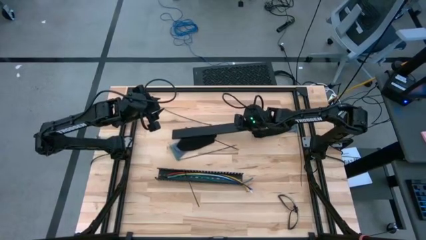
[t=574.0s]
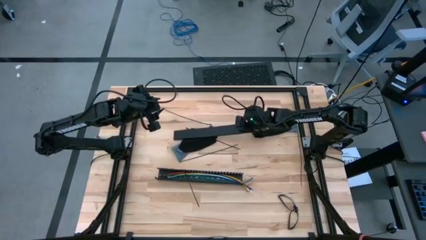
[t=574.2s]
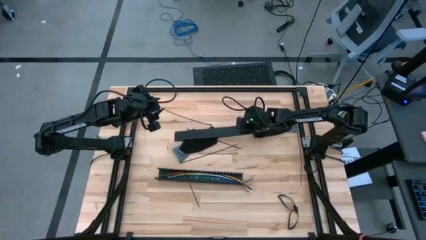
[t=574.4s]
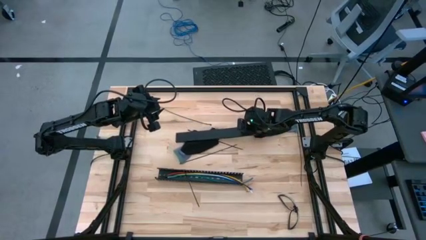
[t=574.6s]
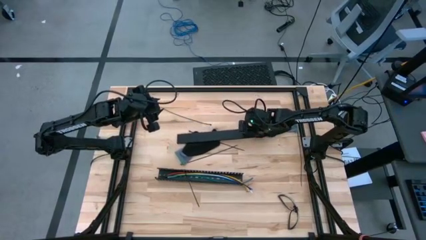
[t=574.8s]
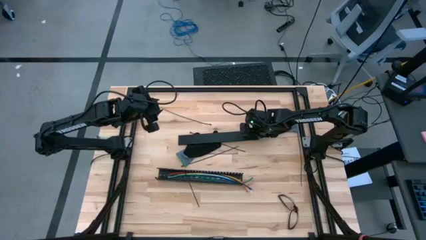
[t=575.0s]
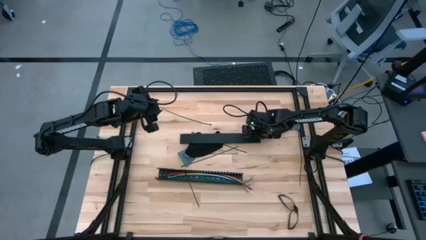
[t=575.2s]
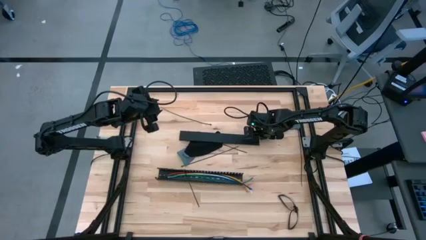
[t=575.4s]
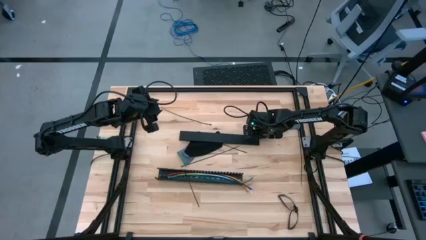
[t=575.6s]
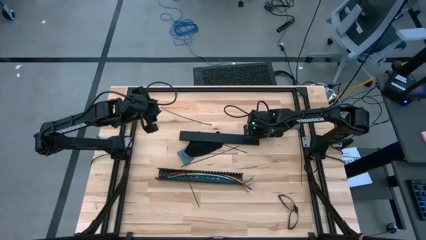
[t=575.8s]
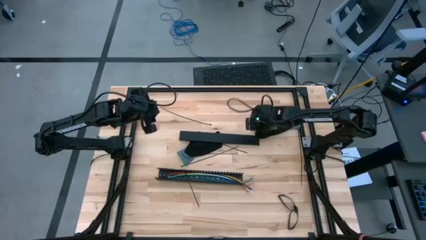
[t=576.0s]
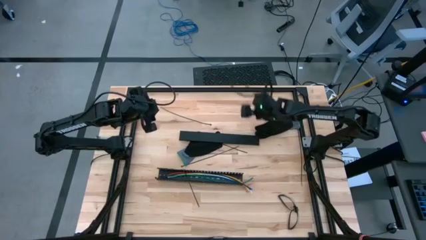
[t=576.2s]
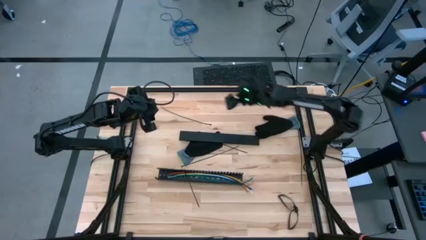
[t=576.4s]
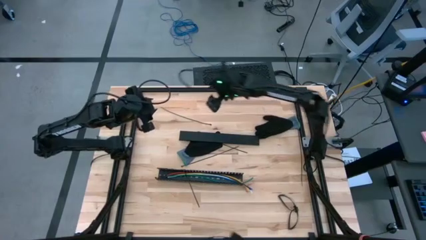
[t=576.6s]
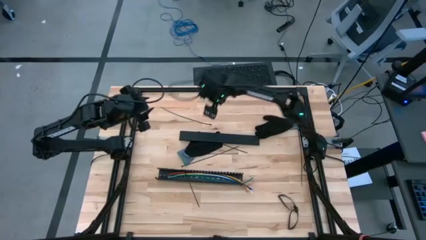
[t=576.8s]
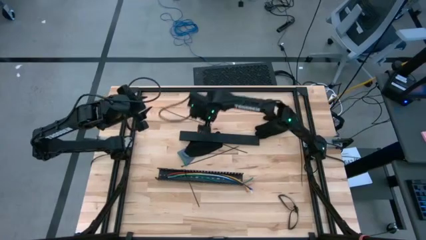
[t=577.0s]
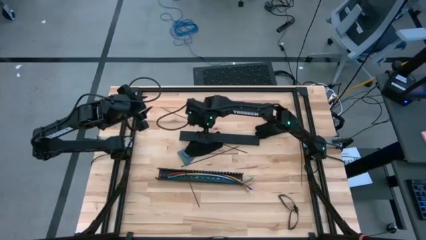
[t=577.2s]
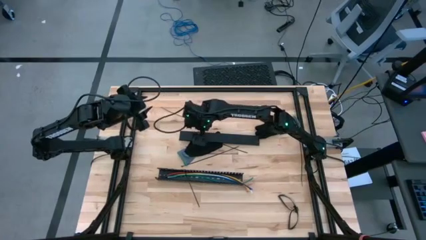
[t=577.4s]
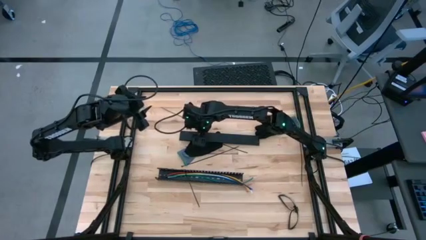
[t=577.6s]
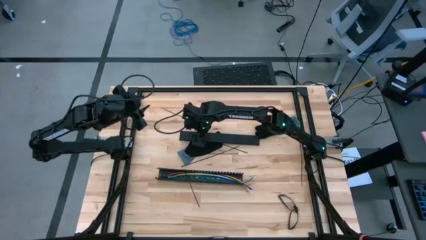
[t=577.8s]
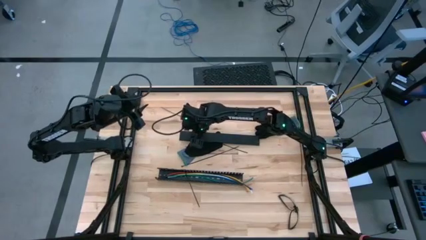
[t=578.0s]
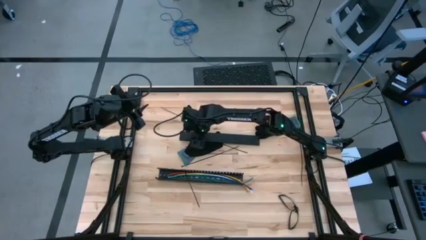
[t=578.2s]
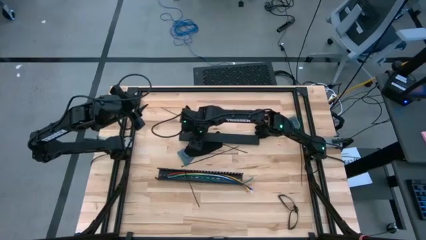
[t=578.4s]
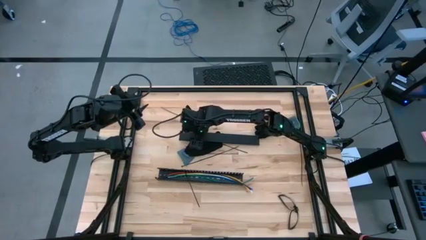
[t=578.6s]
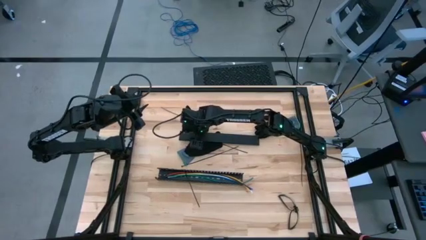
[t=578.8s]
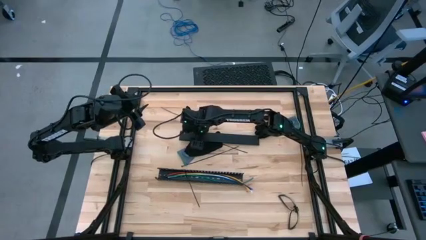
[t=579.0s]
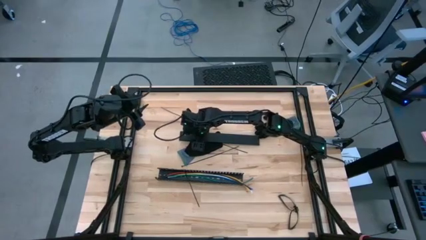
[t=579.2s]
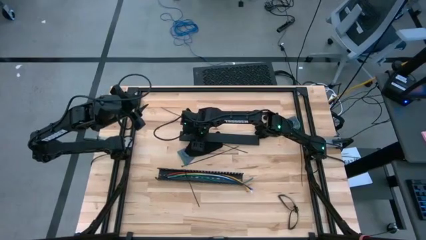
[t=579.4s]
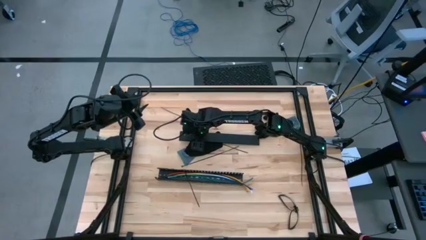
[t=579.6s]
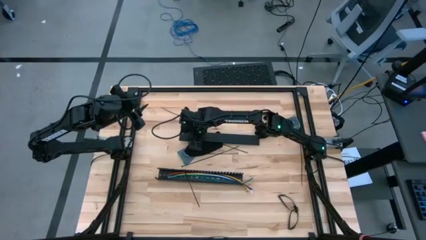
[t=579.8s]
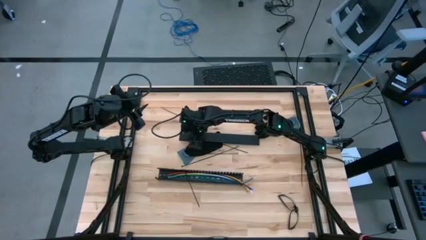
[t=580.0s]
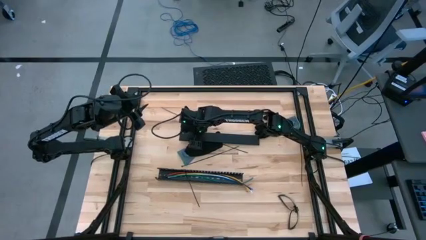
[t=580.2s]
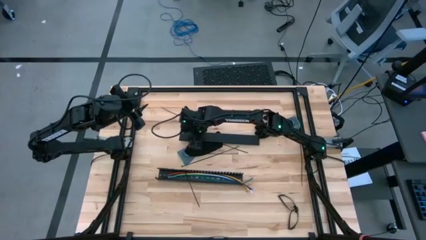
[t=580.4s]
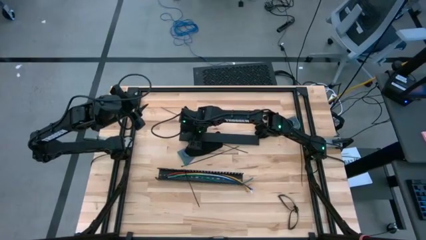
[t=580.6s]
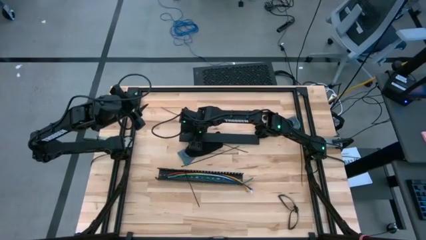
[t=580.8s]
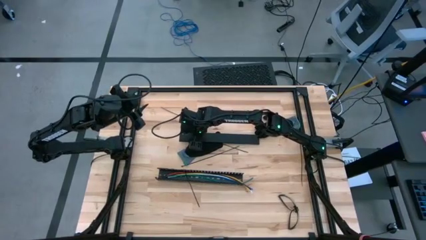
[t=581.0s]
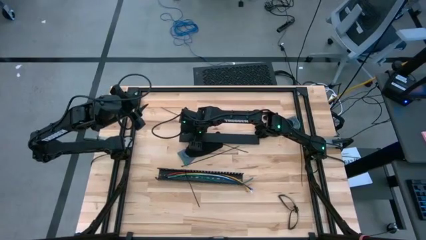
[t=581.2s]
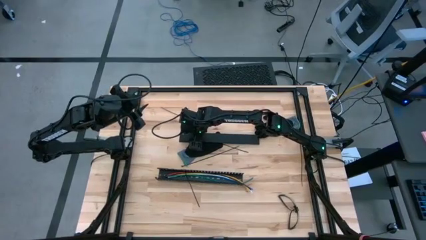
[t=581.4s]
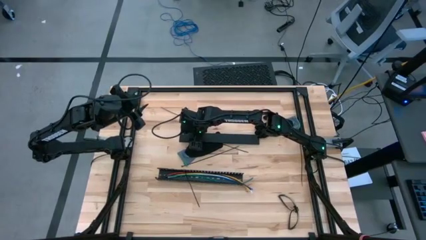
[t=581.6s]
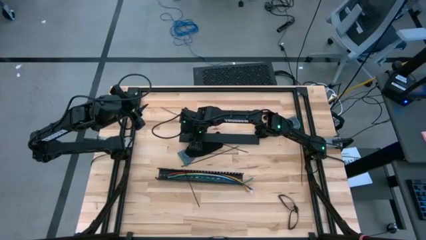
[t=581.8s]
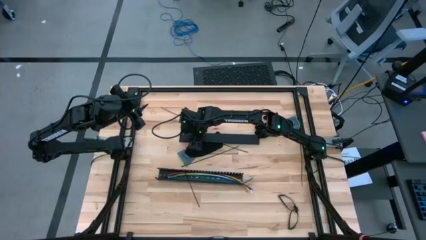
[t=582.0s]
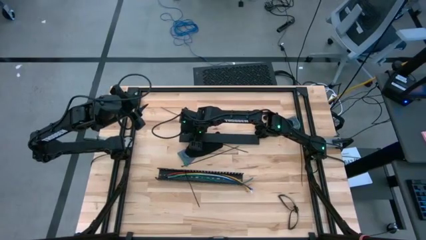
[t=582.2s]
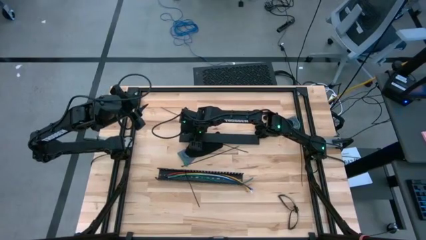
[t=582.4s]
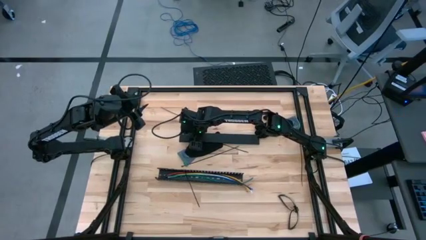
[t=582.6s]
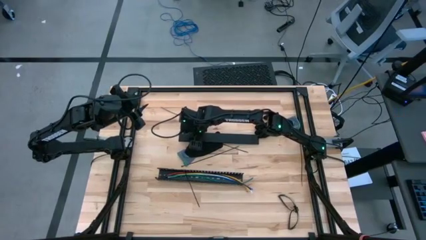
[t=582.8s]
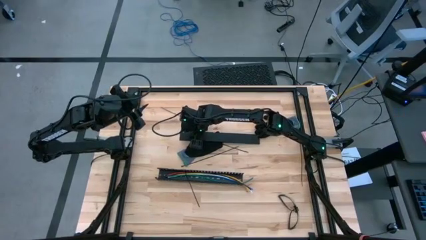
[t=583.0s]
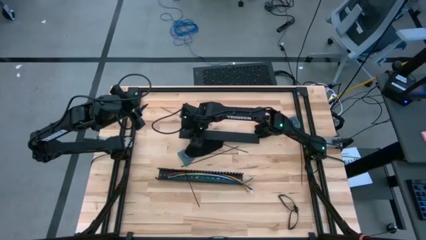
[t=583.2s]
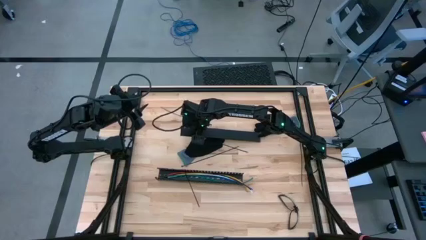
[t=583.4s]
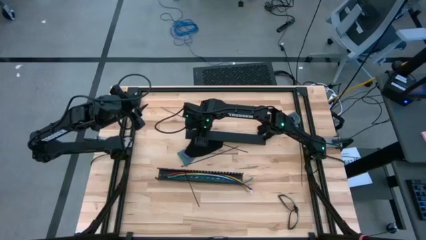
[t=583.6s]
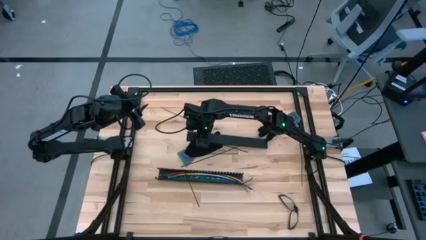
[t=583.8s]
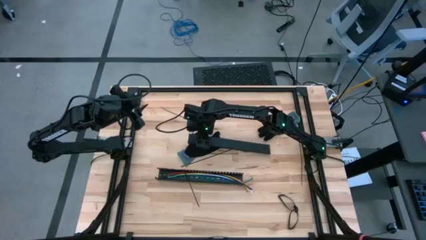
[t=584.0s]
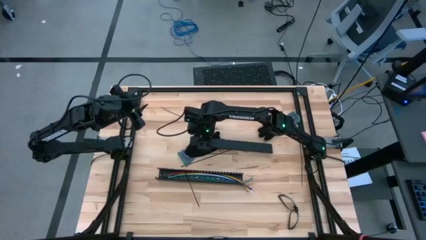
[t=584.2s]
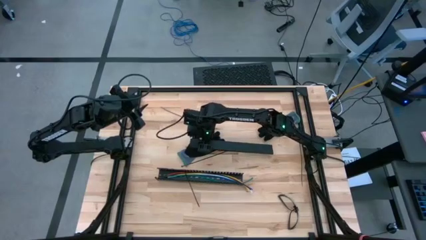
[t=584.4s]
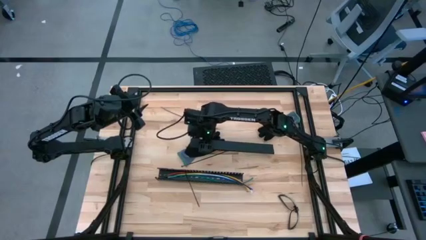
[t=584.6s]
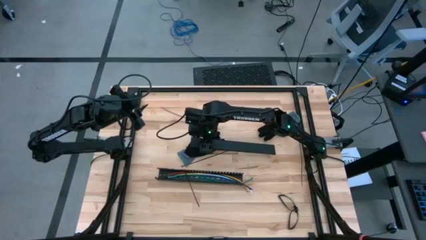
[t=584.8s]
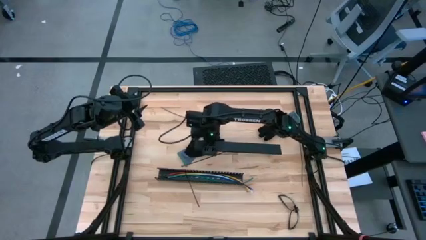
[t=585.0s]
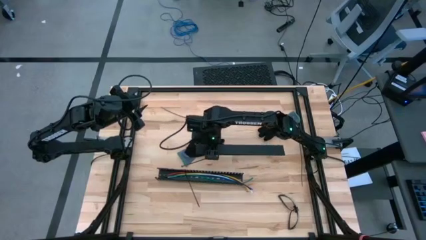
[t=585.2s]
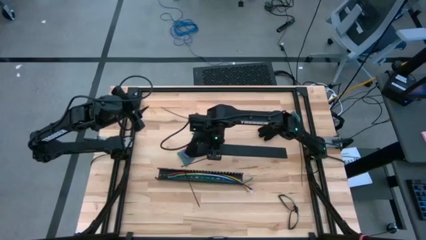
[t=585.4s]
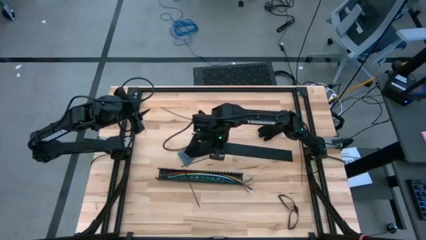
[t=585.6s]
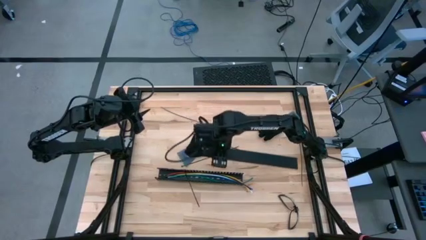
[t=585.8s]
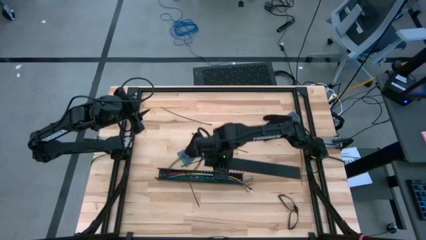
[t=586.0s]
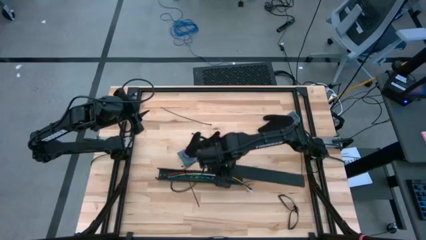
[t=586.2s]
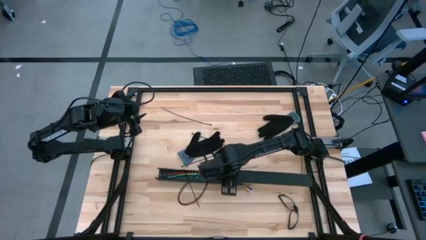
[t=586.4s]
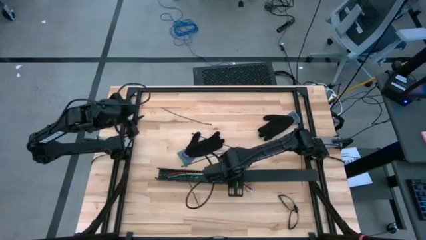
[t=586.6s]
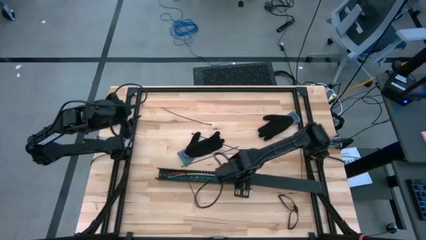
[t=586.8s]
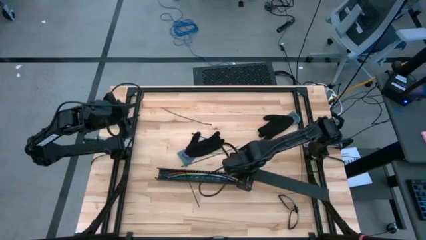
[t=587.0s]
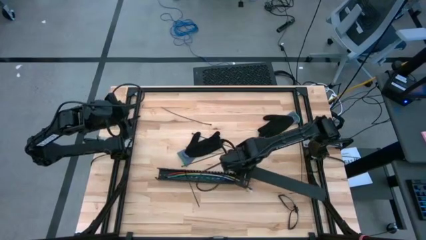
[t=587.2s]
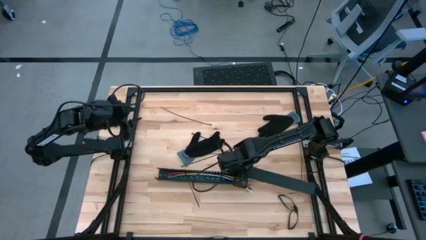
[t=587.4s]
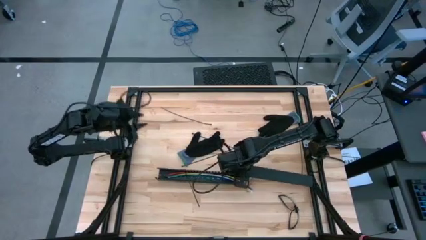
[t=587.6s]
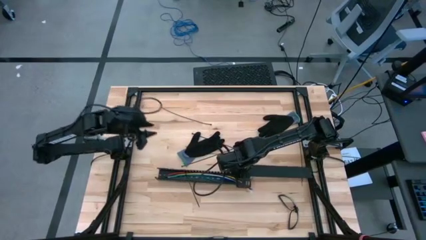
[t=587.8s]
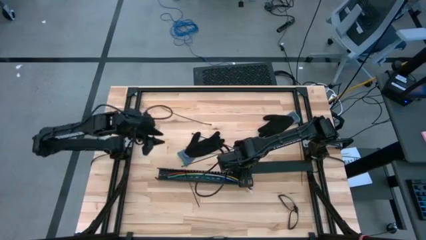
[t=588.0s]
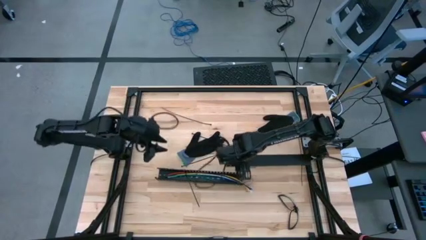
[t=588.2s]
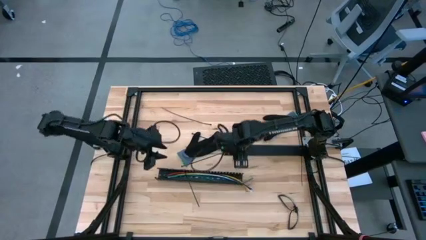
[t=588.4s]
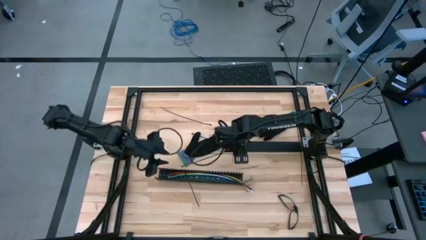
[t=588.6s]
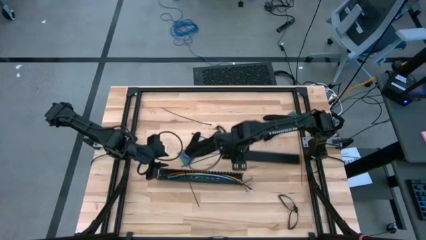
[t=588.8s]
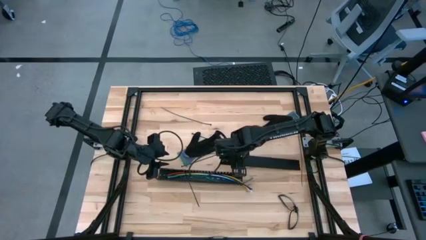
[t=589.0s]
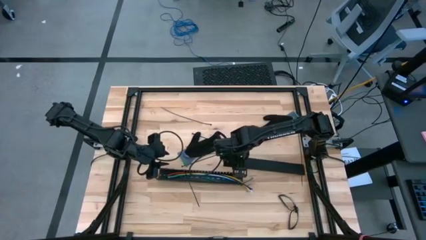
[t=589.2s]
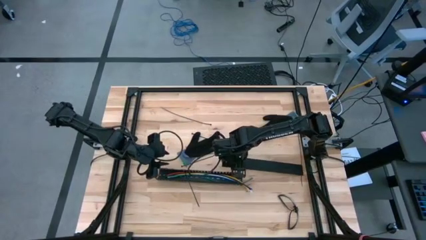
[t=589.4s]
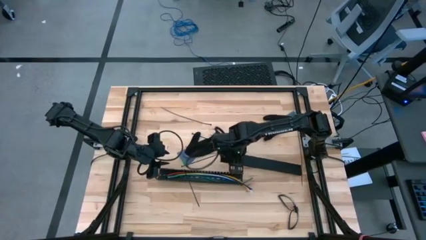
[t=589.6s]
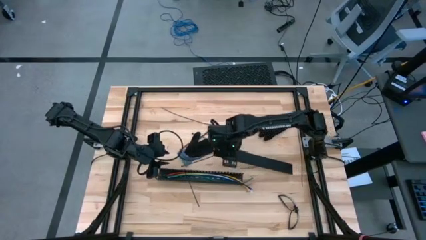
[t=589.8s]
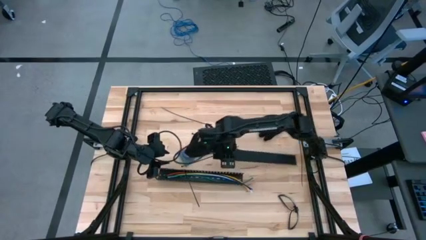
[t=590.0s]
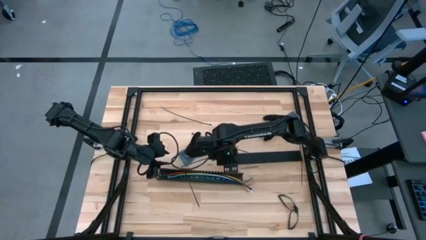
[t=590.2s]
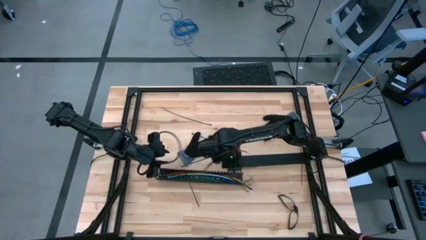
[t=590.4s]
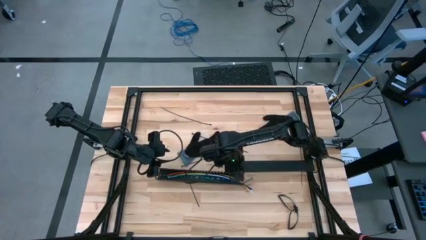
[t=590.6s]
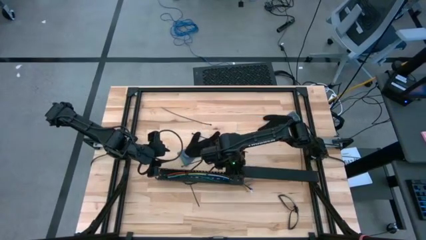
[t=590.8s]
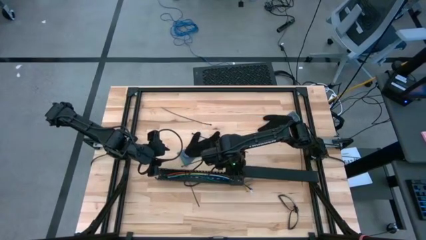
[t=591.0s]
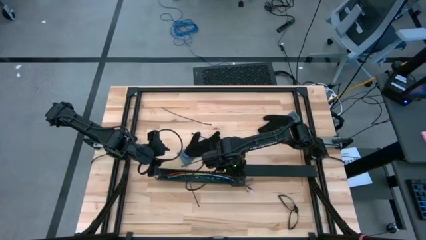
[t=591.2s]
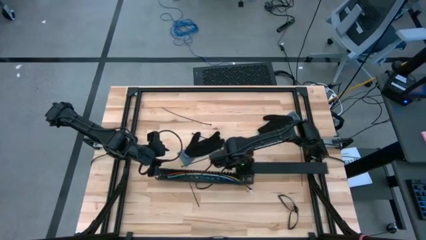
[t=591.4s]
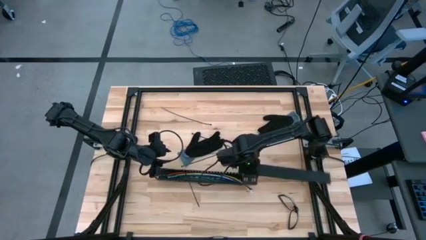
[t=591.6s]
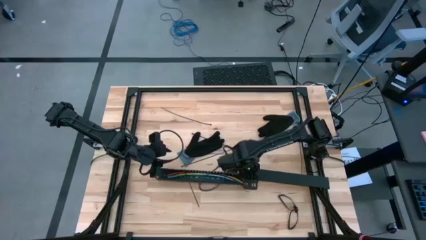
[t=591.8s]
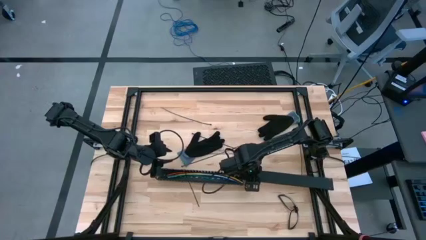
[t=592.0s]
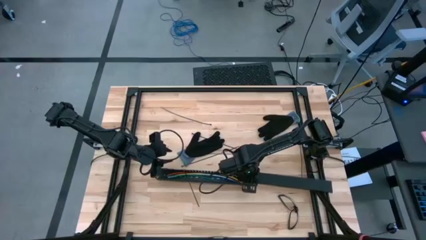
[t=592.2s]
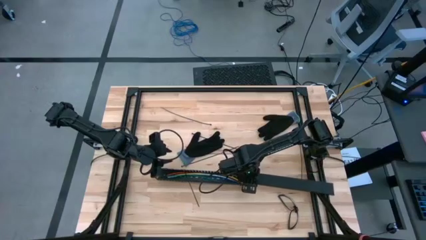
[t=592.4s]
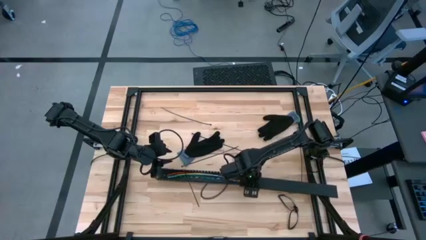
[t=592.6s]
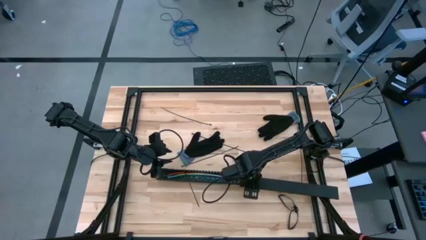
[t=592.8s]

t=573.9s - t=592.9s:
Task: Ziptie cables
Close the cable duct
